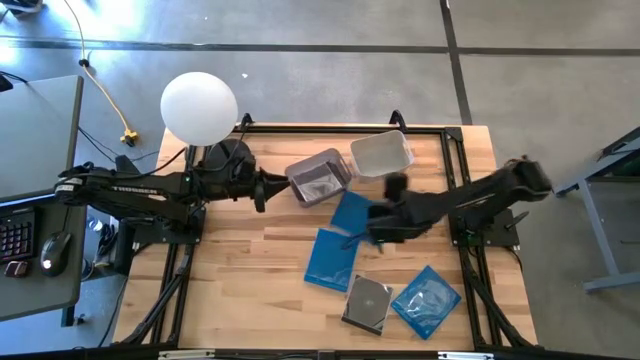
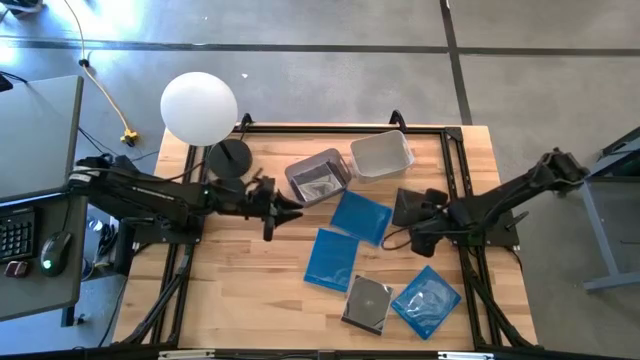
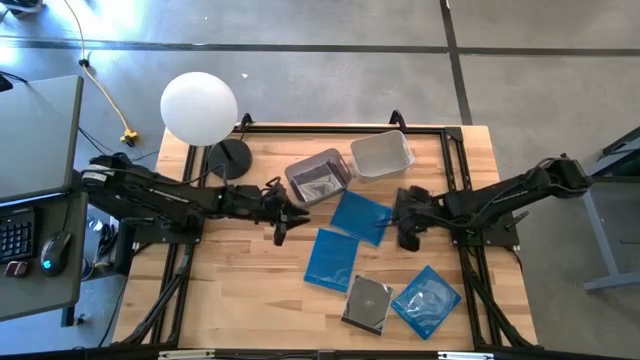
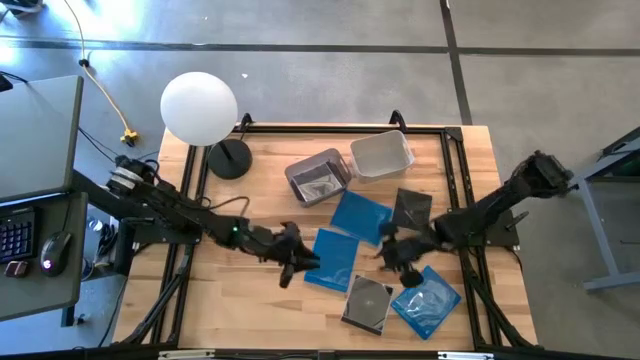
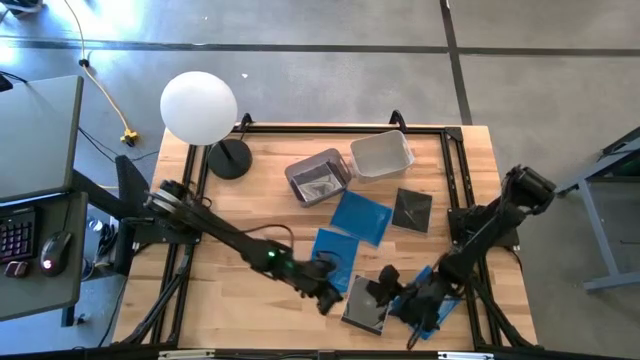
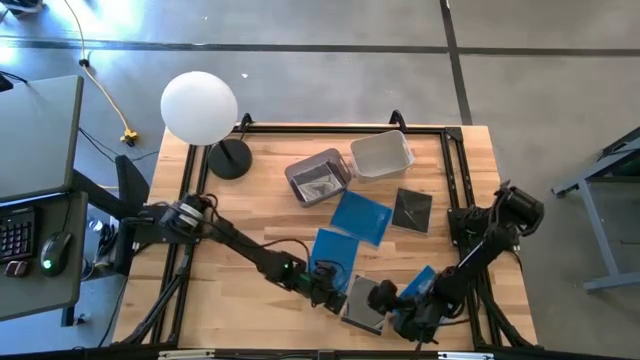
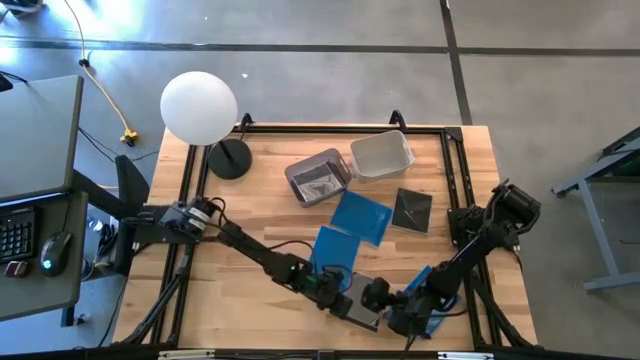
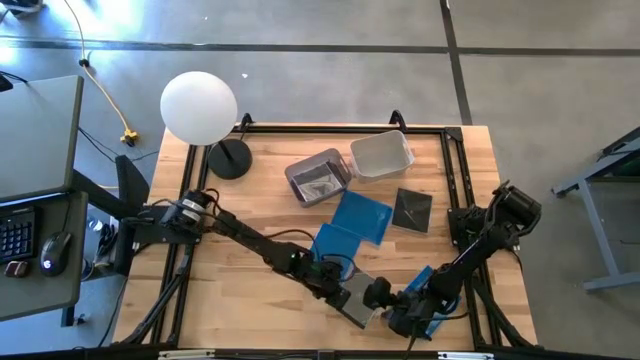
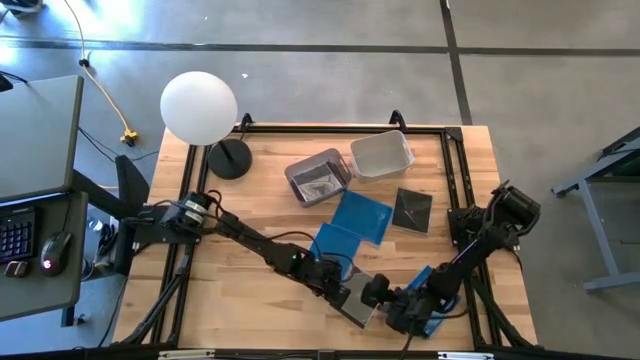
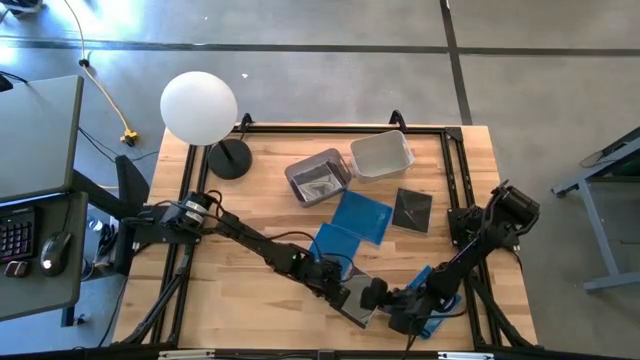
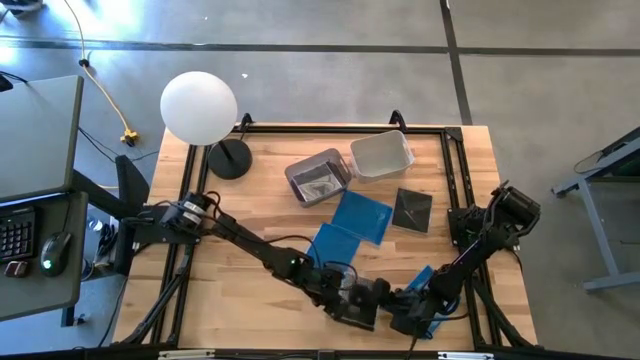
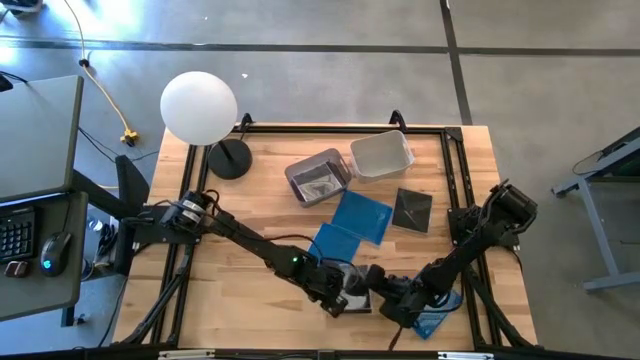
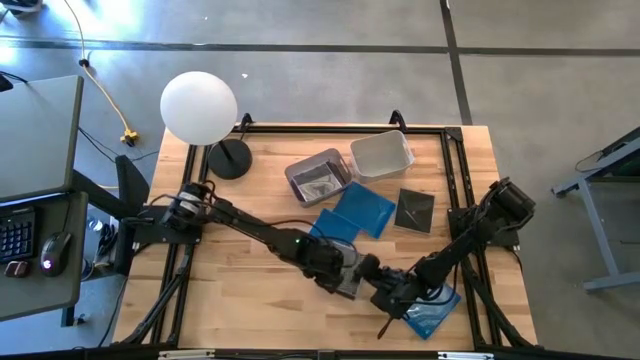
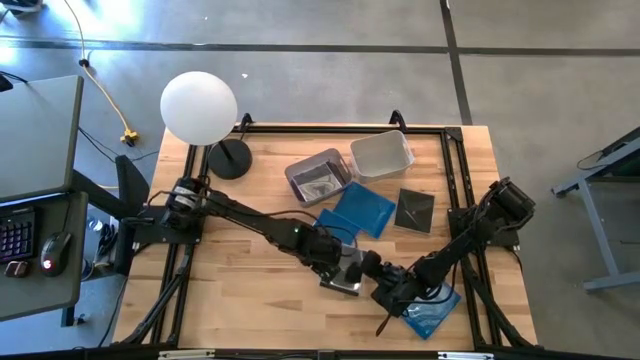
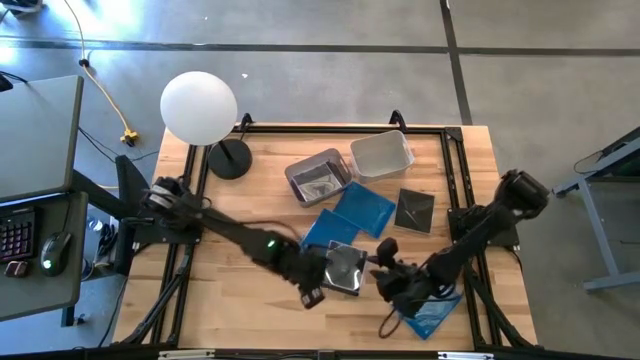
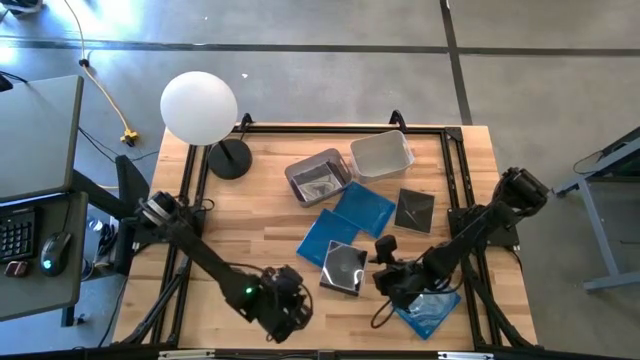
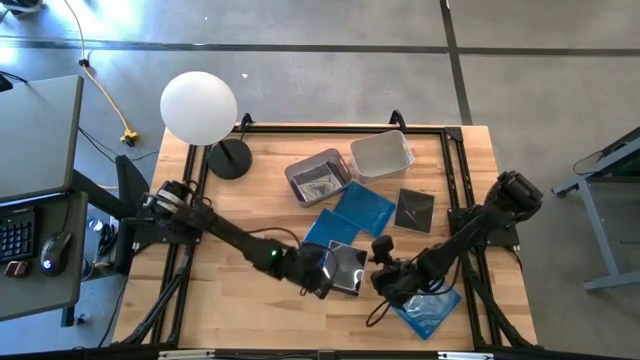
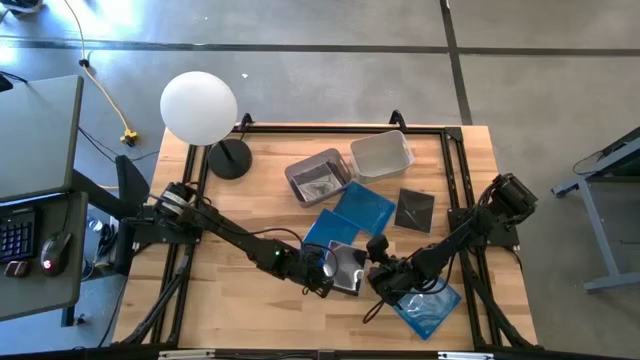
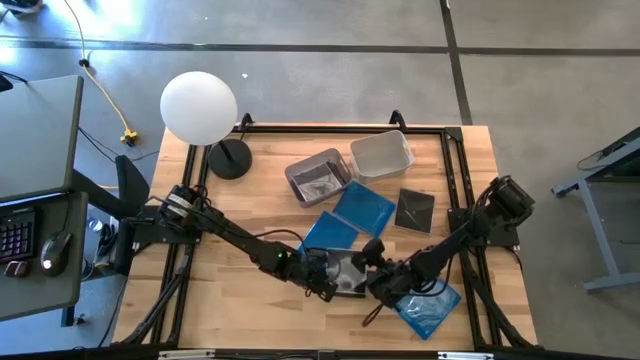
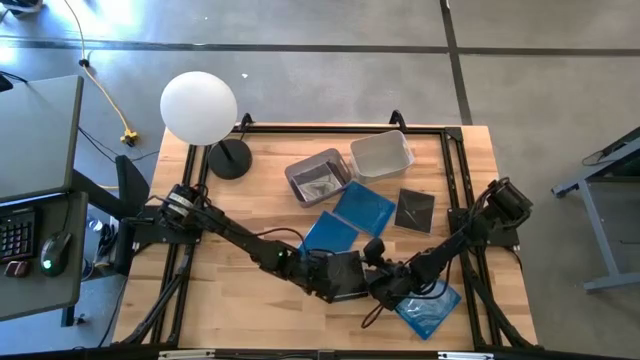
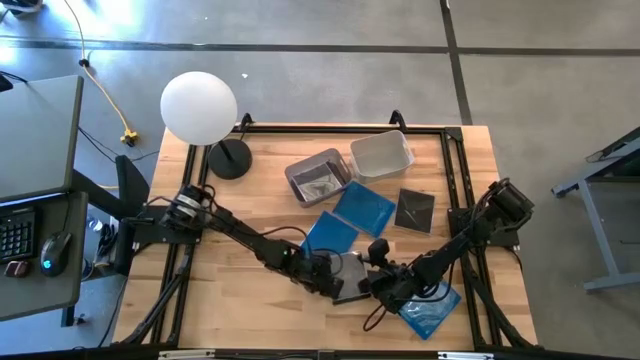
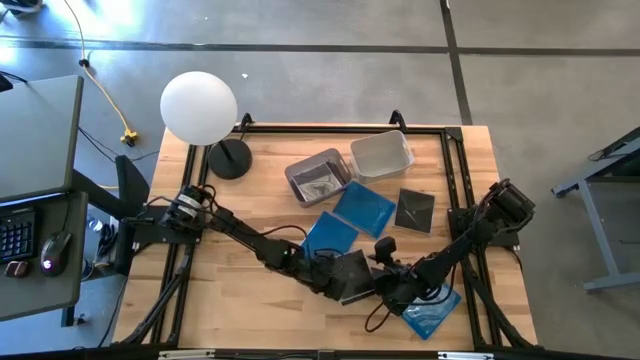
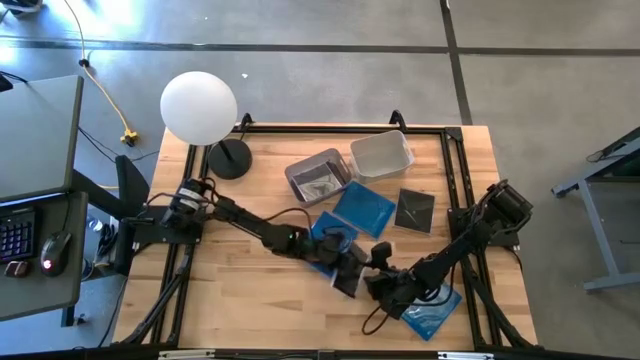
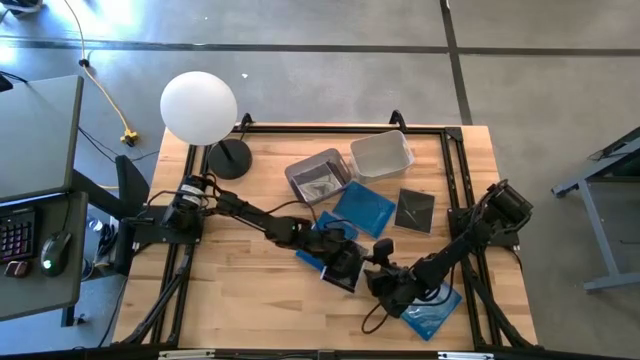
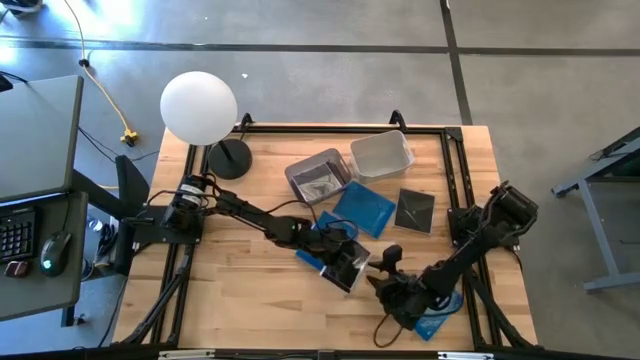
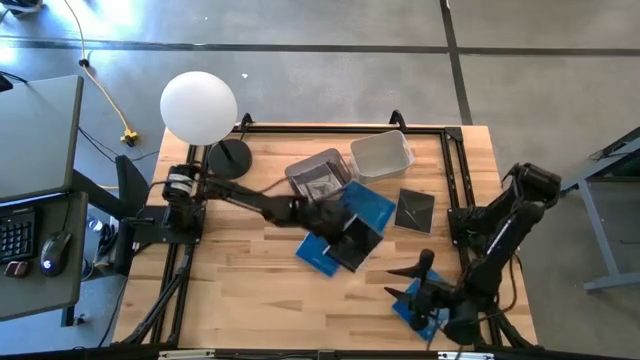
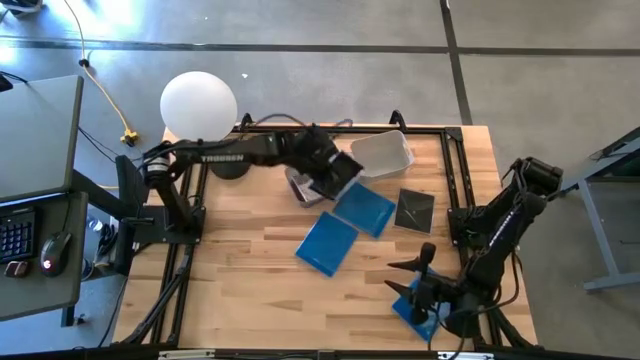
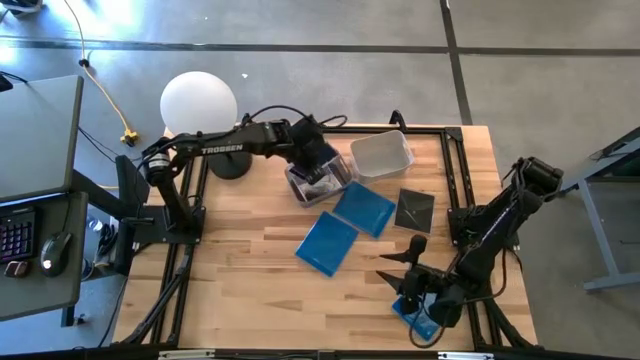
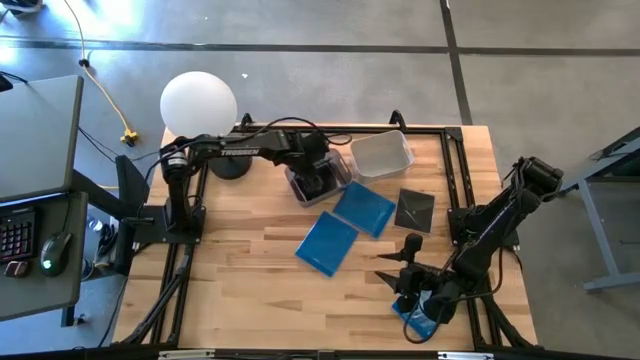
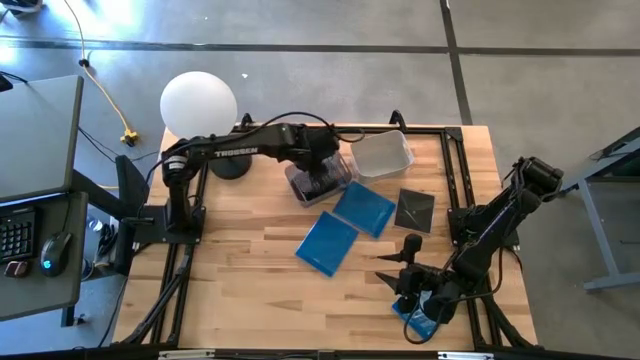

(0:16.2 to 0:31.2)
Task: Pick & place jewel cases by type
Put the bottom black CD case into the black bin

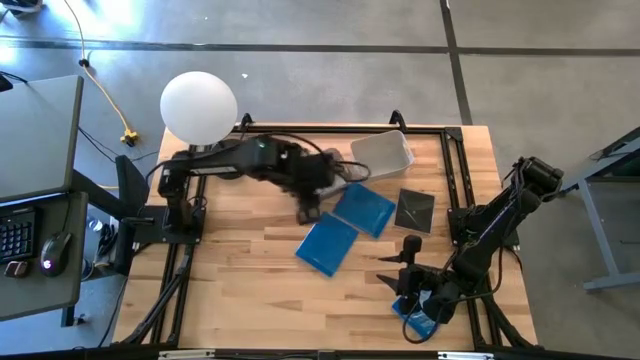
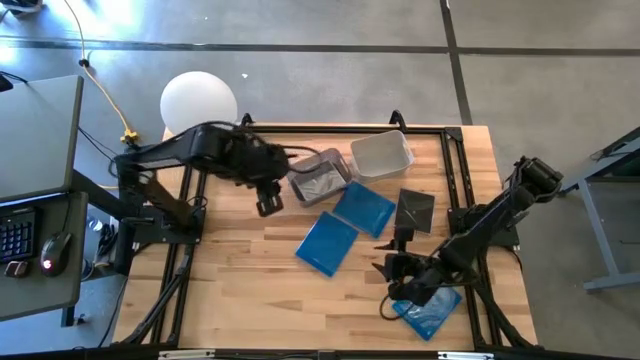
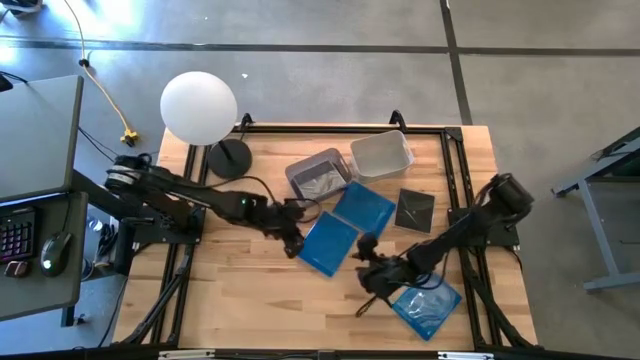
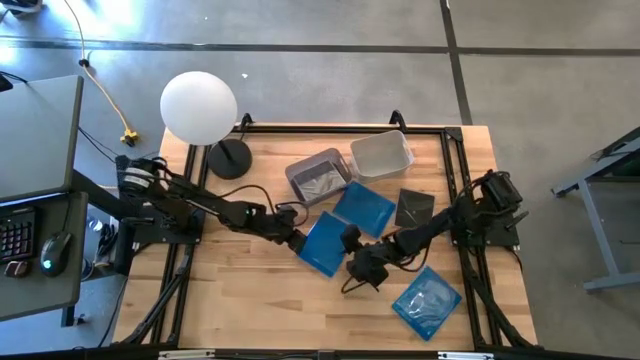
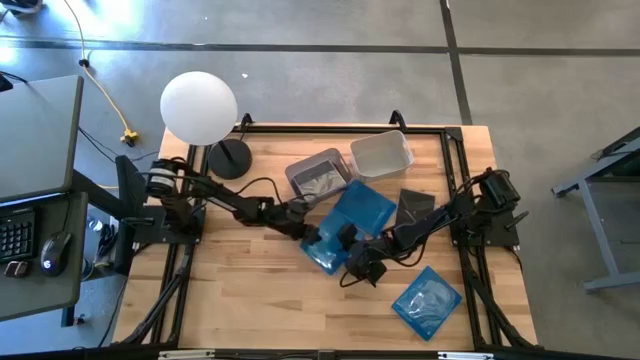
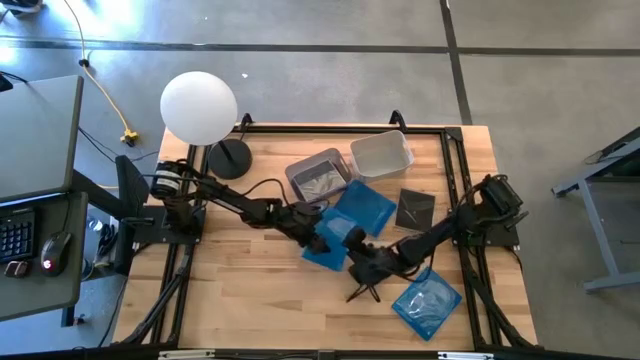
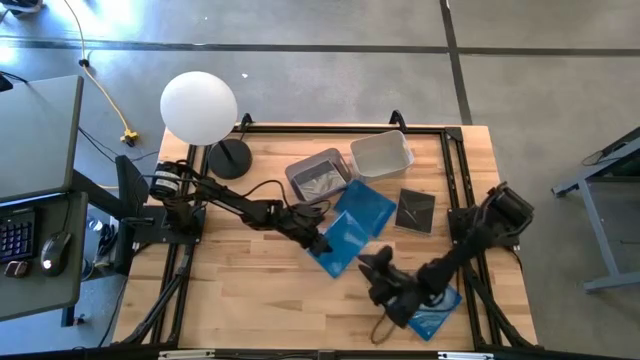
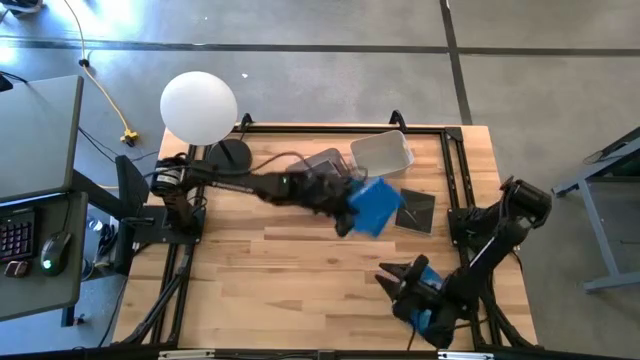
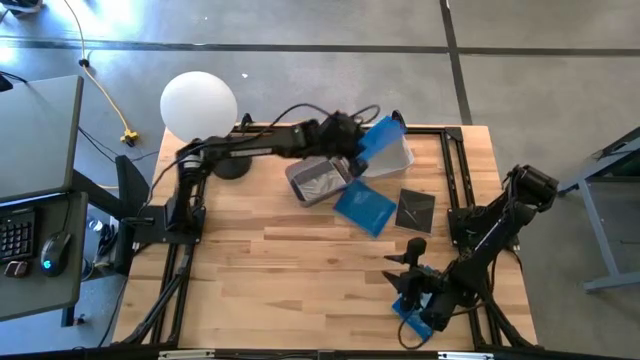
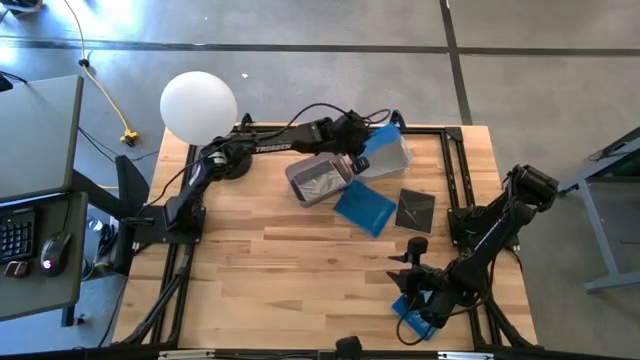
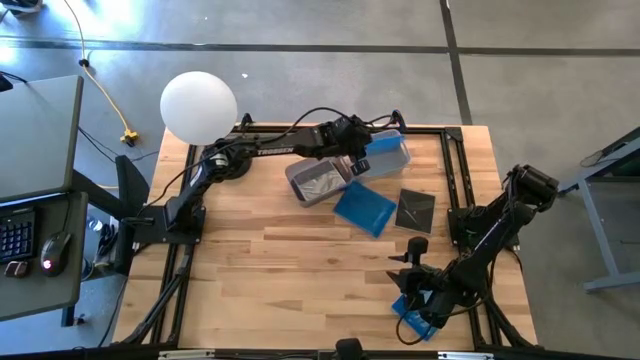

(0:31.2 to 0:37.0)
Put the middle blue CD case into the white bin

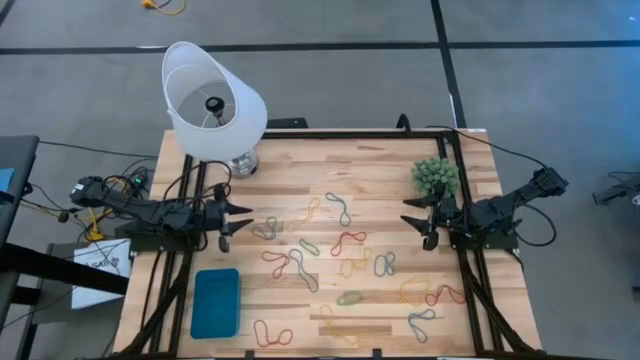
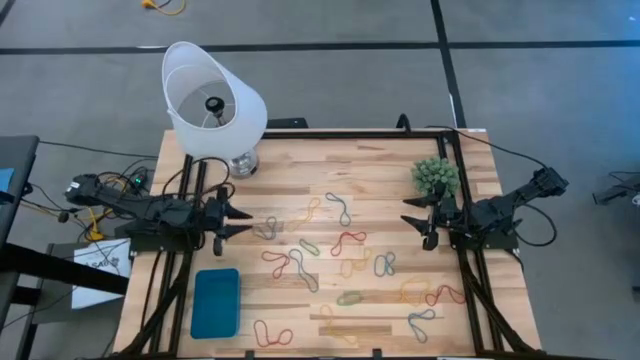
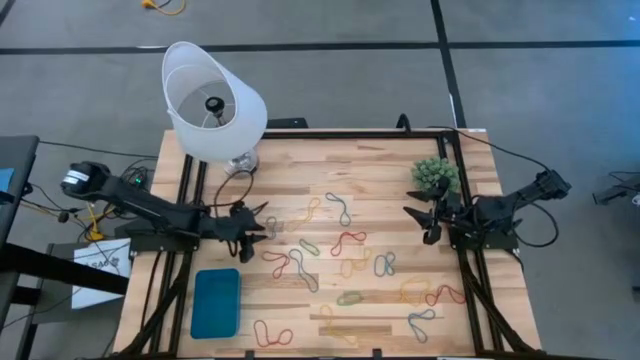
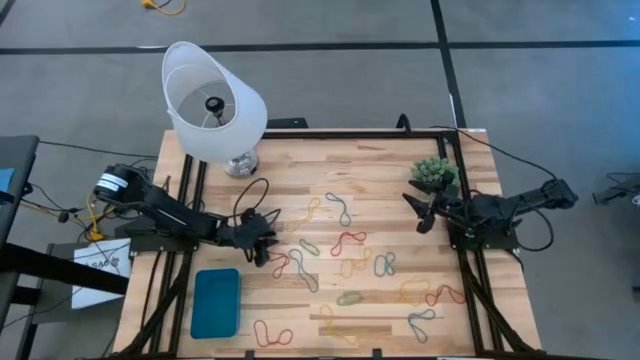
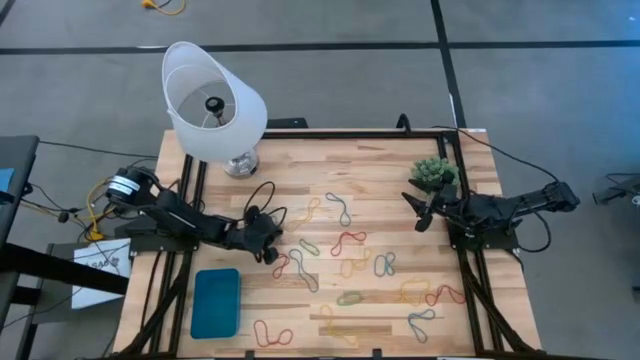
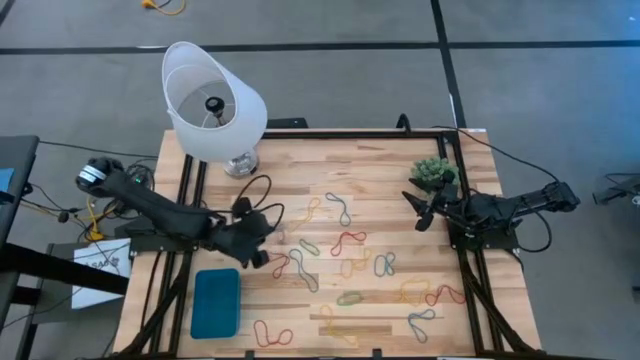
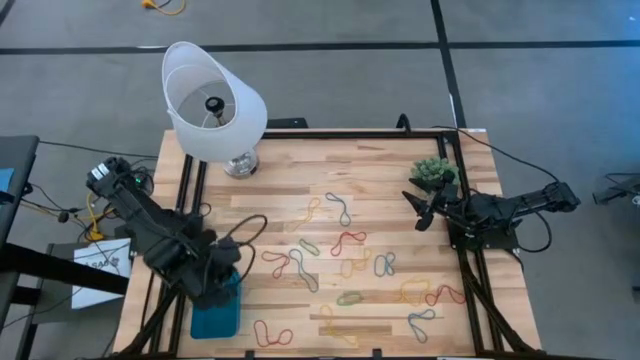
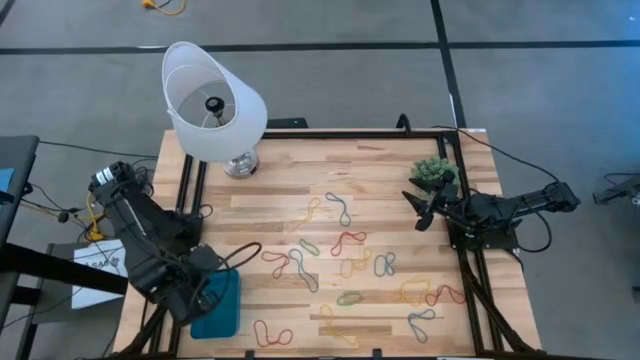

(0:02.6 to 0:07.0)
Task: Pick and place items into bin
Put the blue rubber band into the blue bin
